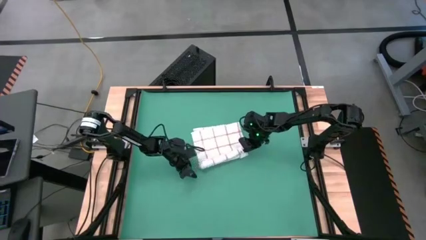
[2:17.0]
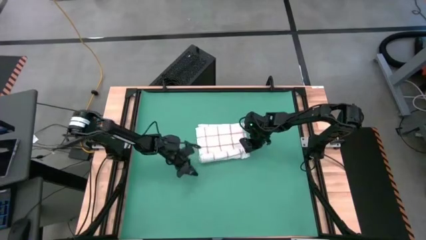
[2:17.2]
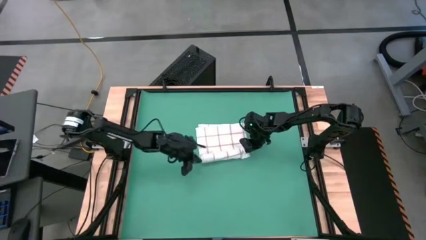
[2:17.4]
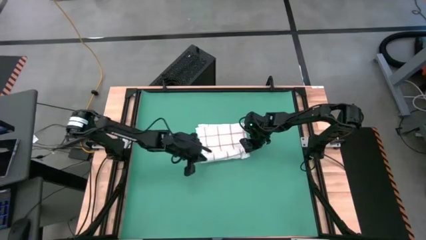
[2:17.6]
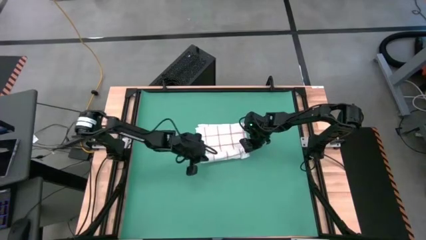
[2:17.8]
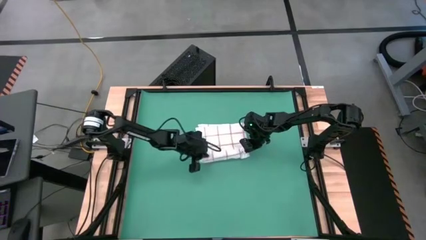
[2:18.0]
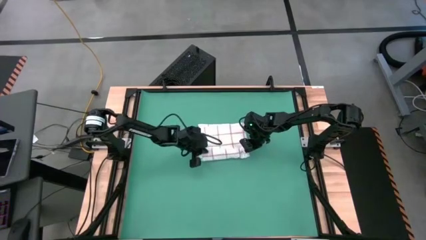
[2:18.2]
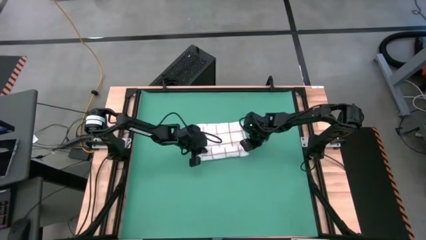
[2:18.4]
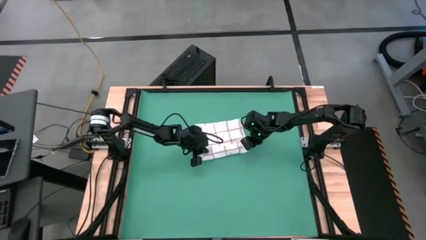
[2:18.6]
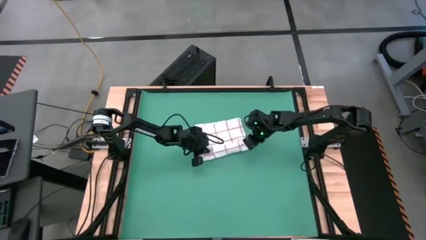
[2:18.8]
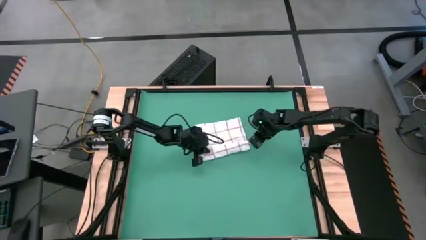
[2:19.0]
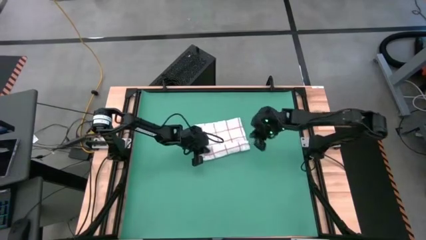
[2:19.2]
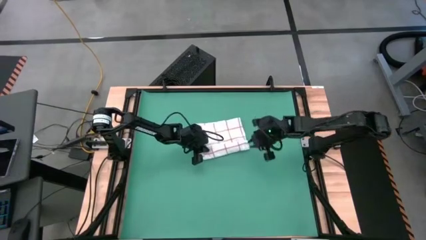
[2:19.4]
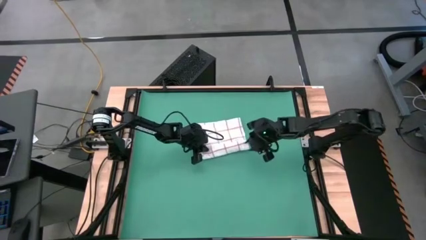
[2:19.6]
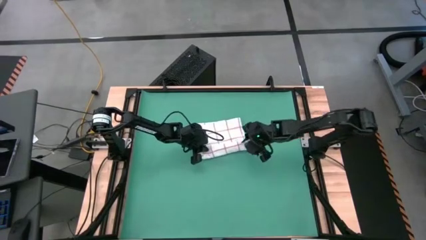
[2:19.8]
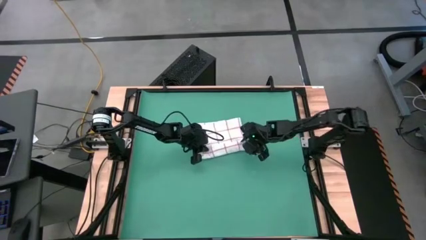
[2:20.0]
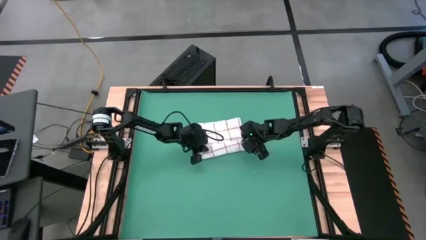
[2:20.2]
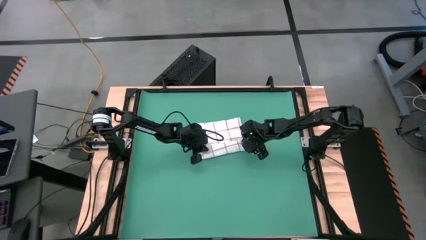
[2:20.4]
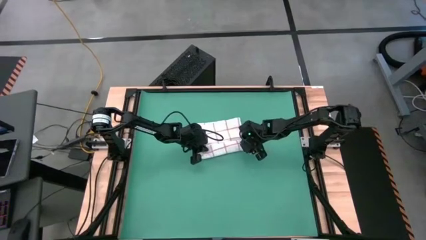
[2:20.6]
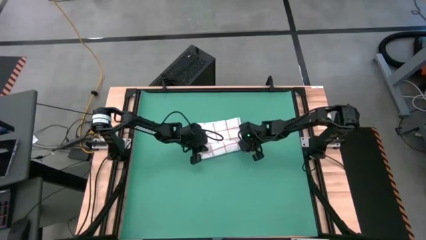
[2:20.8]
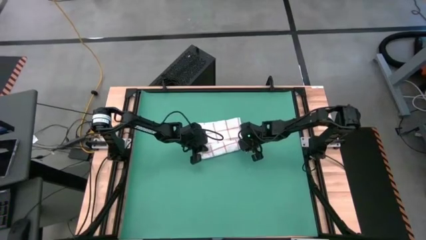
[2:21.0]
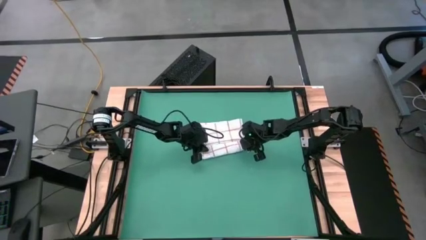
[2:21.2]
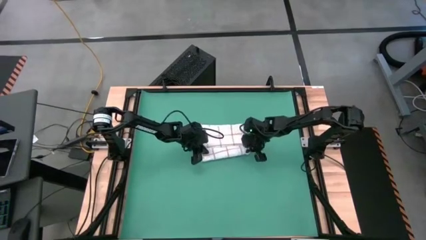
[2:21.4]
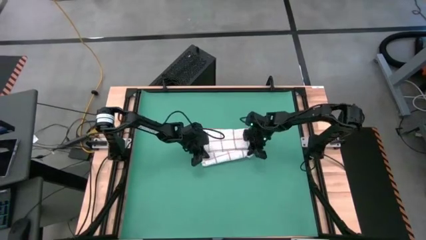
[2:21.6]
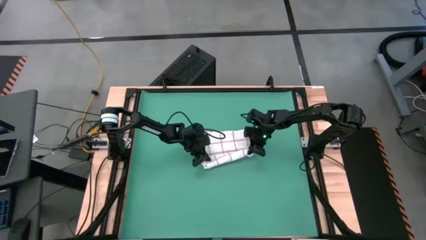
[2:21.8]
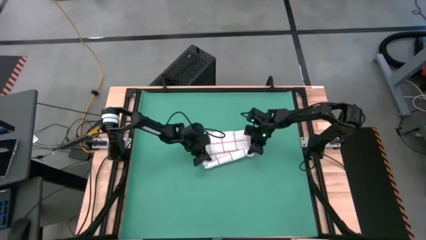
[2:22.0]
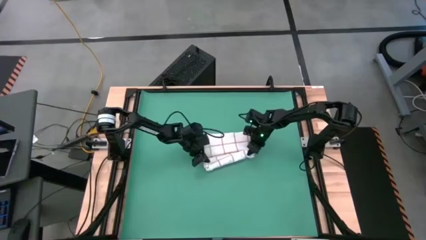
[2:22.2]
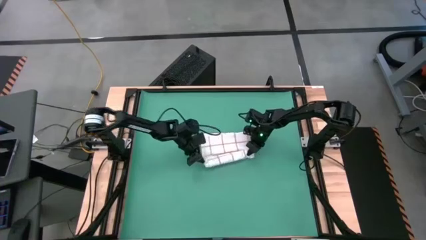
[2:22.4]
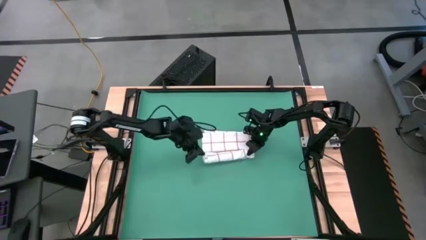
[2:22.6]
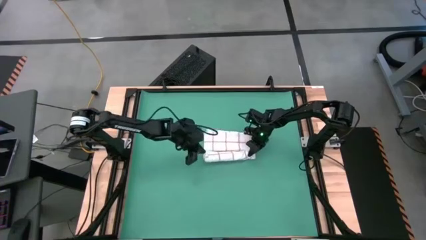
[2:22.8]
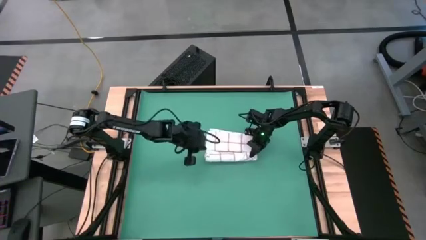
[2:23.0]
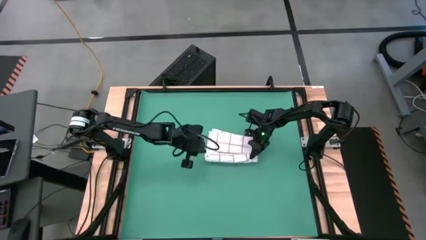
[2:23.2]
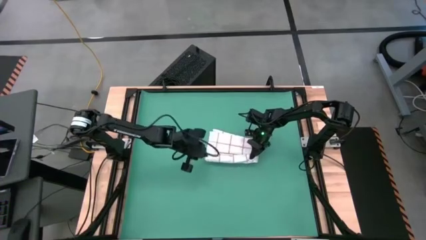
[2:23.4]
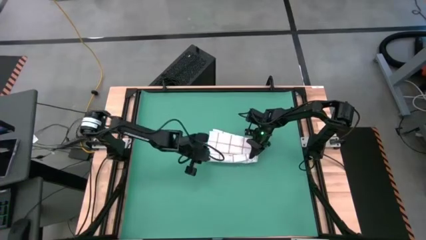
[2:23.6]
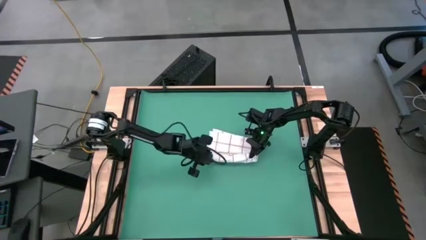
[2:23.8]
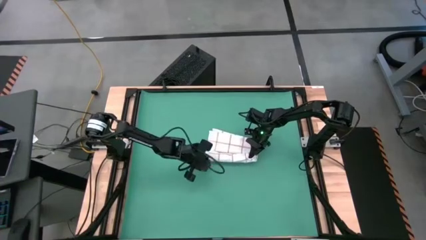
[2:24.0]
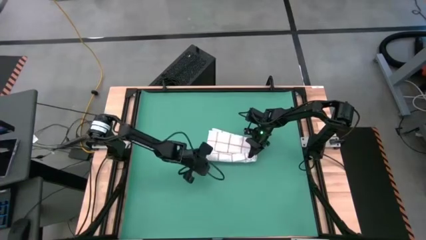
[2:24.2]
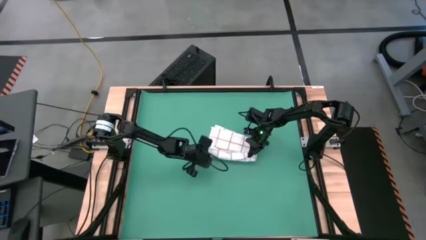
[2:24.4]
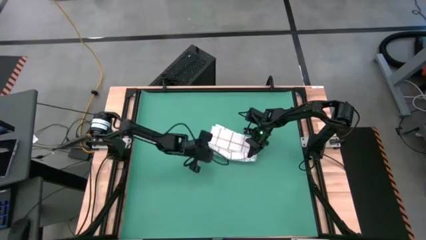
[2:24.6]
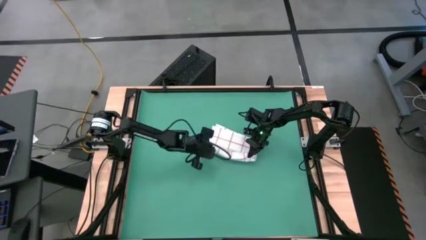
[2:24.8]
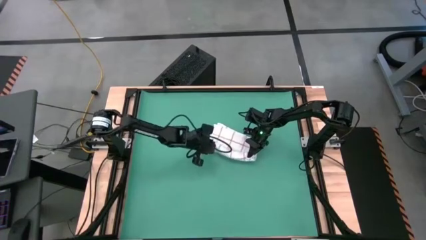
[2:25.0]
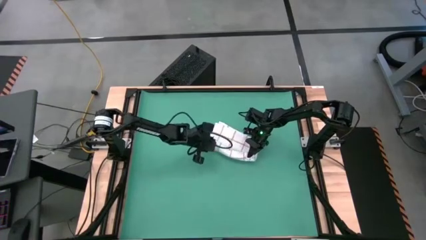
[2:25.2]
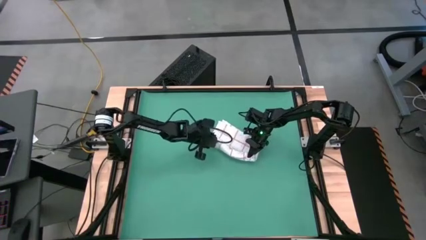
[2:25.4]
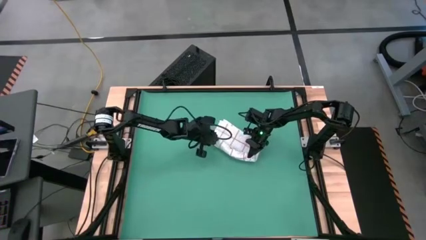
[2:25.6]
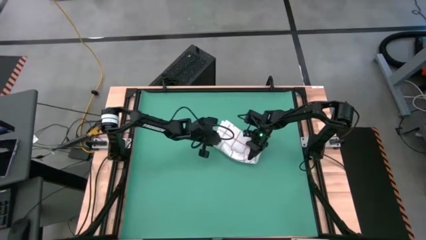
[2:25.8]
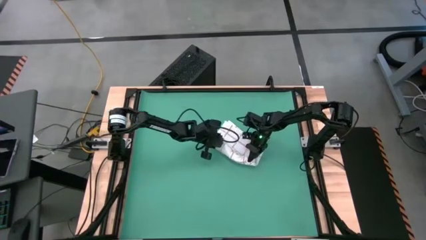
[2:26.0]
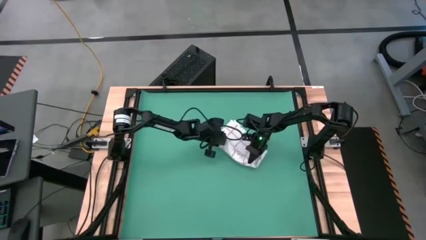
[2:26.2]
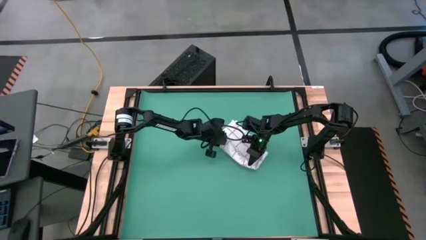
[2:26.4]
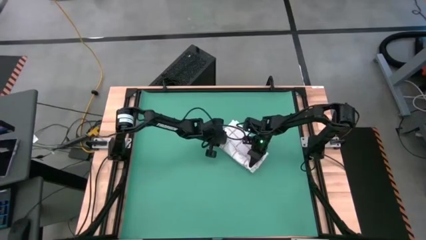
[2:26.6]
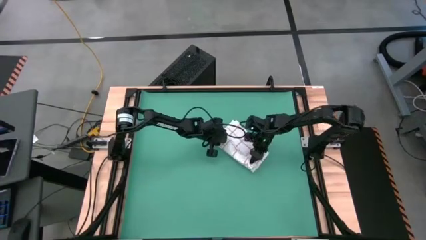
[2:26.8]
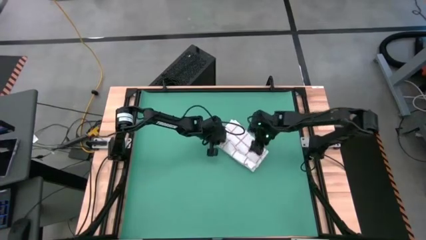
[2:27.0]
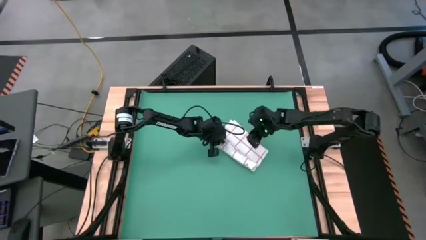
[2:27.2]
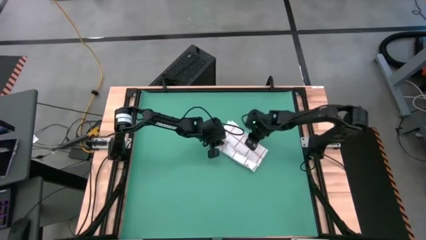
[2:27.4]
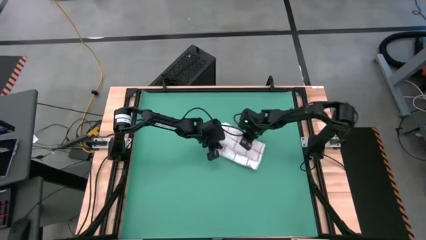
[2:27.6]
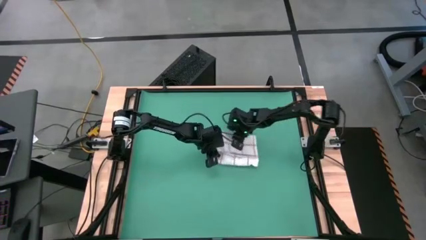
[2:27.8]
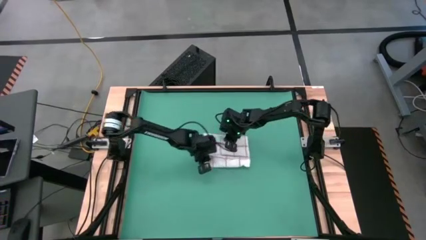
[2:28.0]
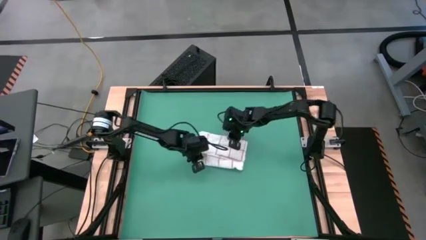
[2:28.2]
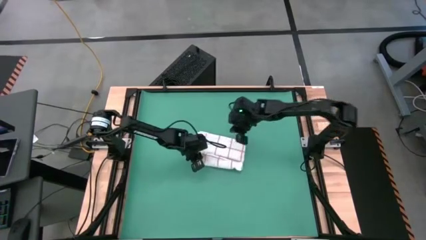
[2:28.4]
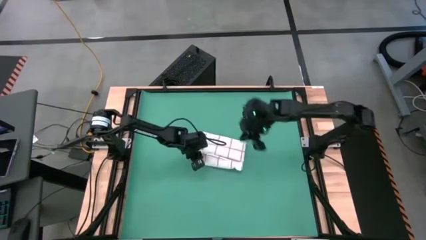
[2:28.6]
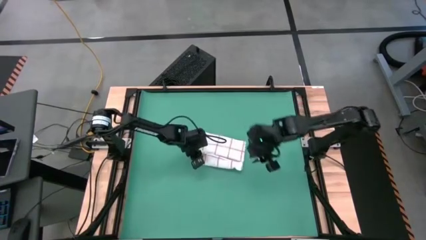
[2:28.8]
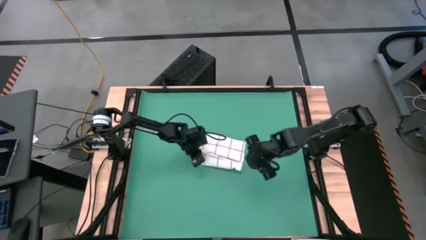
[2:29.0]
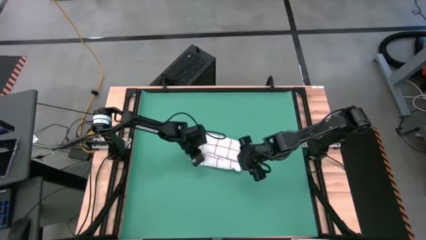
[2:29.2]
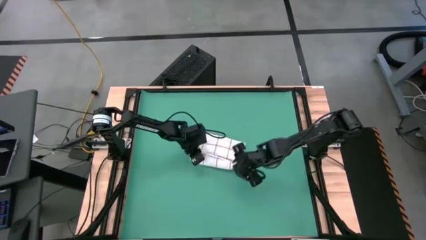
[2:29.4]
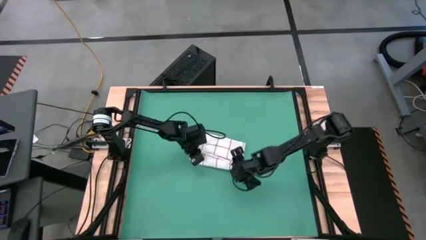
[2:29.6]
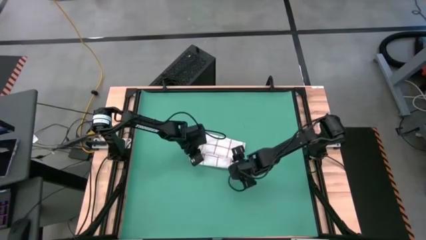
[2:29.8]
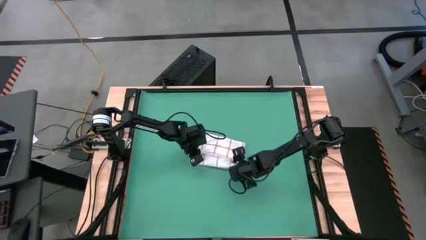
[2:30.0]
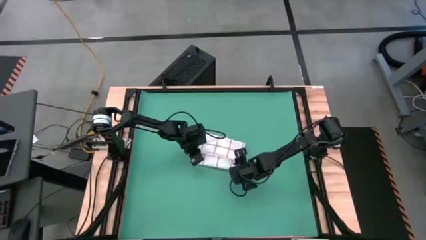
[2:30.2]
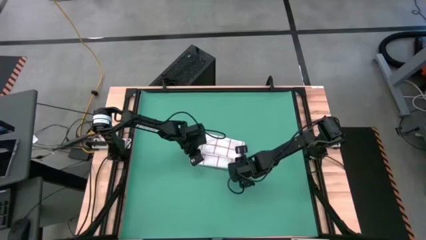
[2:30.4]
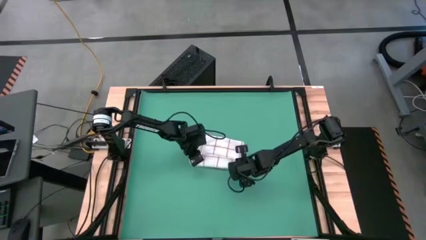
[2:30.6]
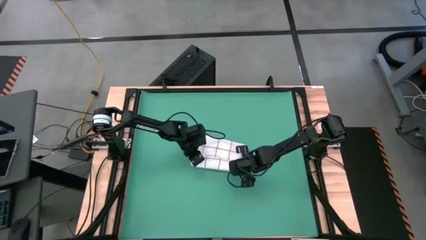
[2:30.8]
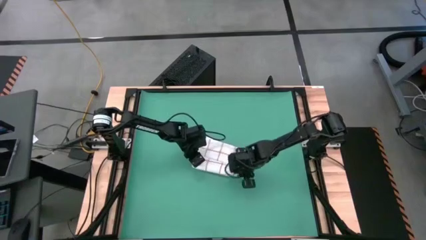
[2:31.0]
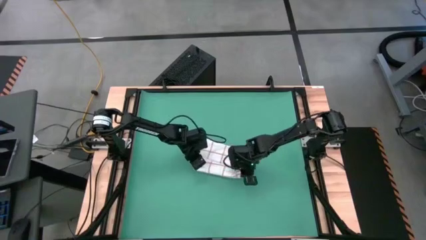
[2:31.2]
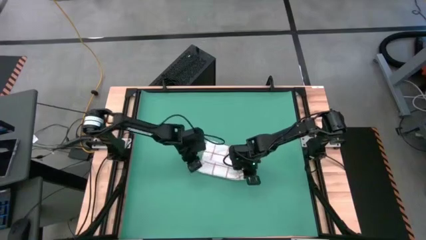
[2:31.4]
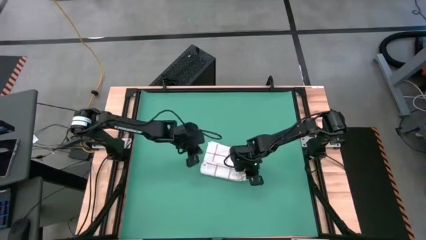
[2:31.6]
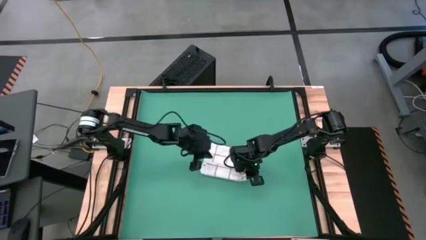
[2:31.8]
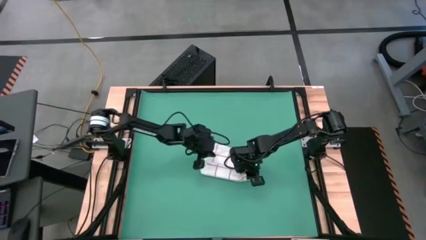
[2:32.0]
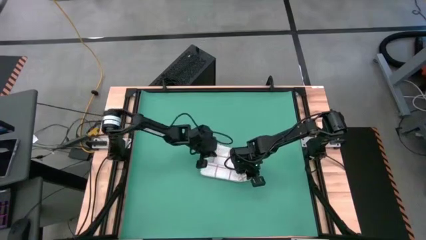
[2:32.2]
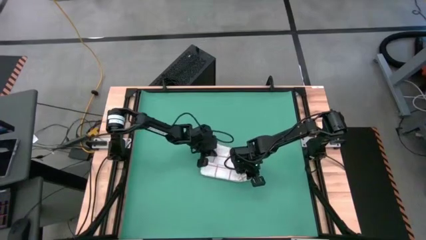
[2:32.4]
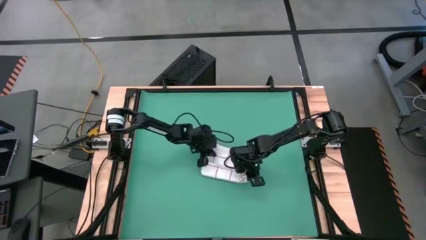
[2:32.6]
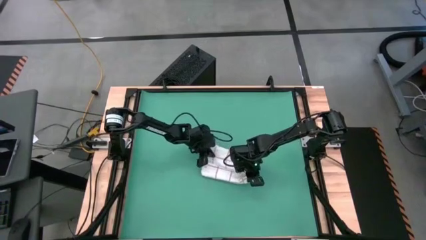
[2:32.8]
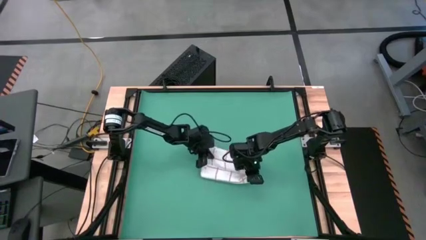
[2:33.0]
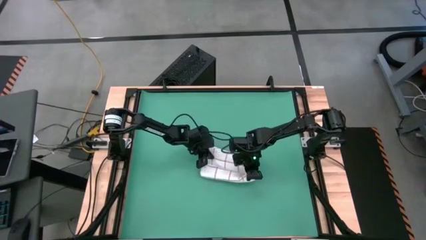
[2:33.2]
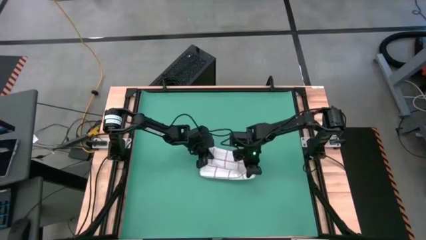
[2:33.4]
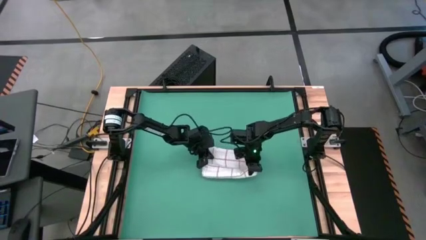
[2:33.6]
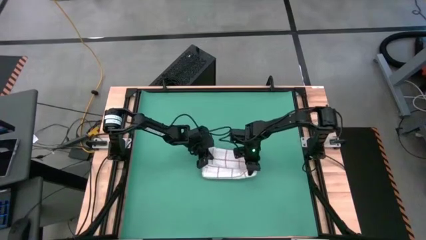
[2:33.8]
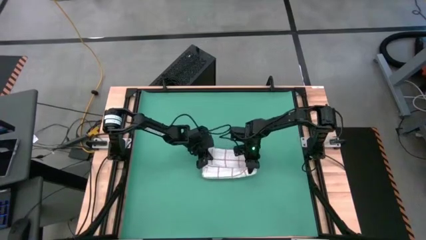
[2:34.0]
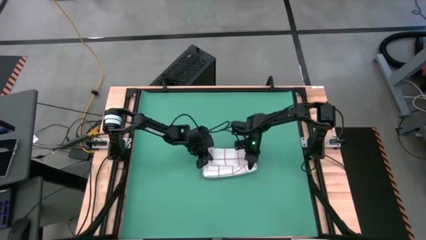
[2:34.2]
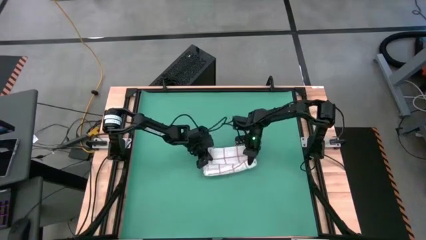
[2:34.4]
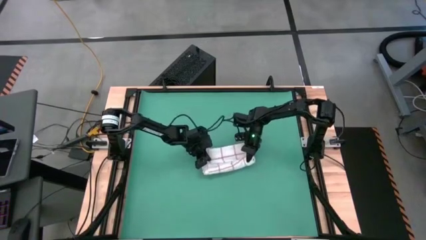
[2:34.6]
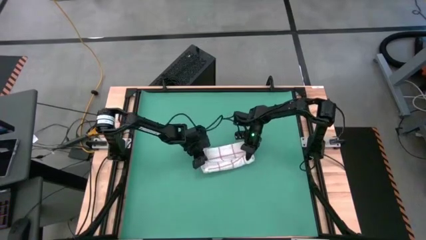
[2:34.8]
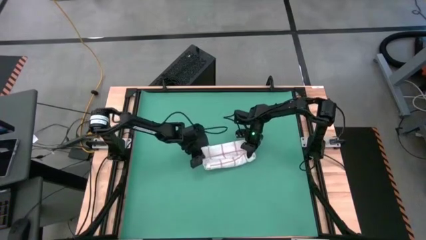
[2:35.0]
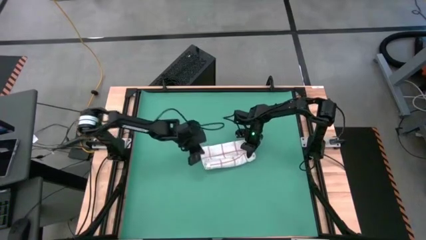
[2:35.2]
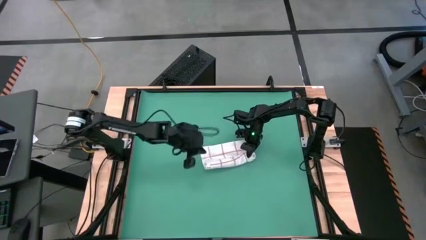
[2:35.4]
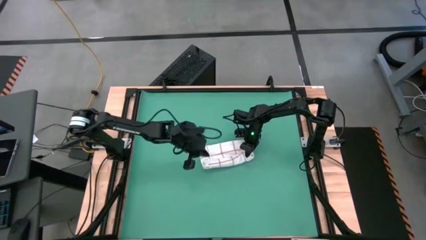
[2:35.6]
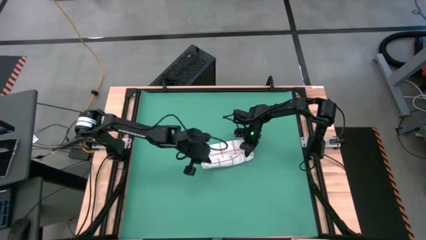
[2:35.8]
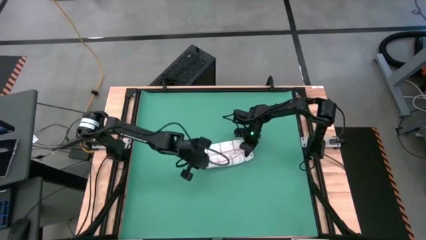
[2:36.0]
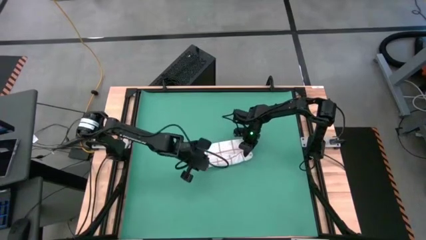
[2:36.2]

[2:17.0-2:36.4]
Task: Roll towel into tight, uniform cylinder
Roll the white towel
